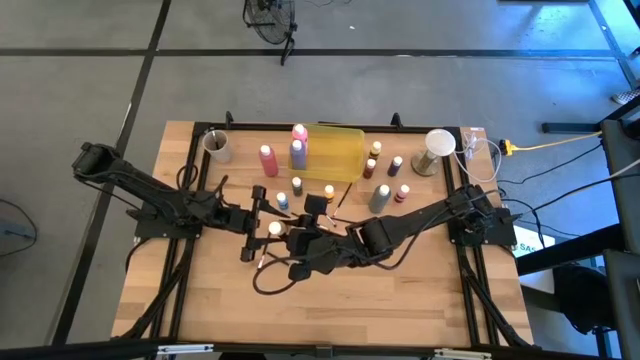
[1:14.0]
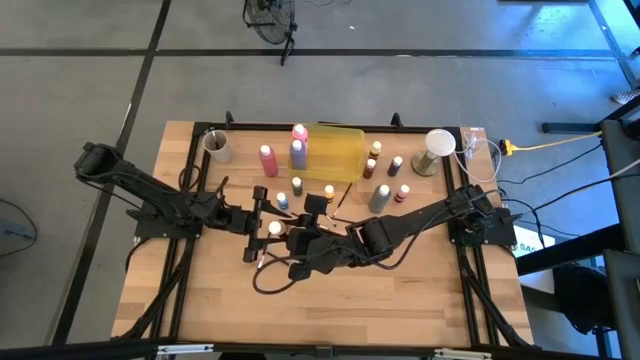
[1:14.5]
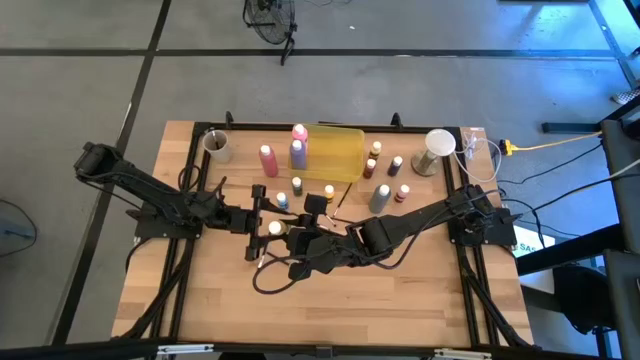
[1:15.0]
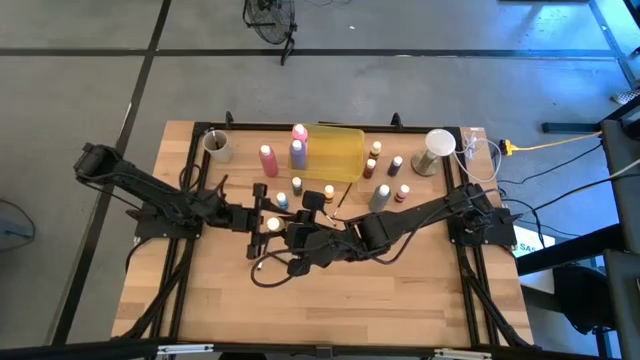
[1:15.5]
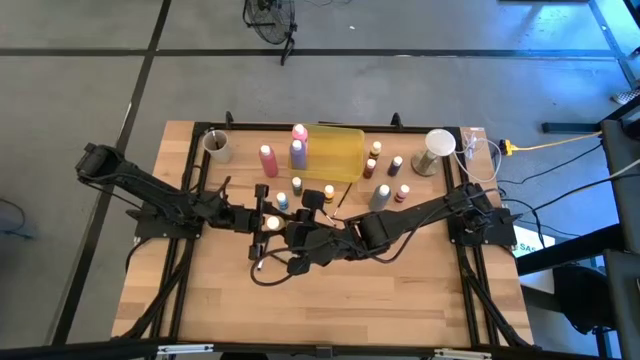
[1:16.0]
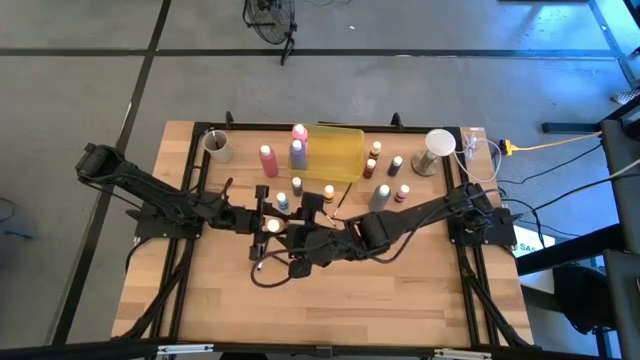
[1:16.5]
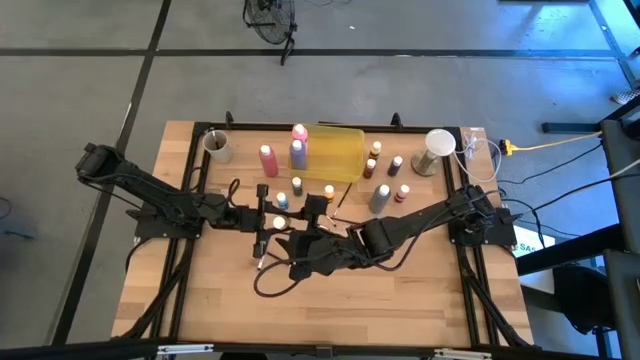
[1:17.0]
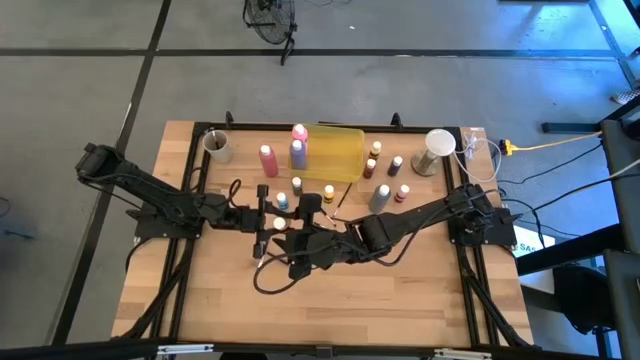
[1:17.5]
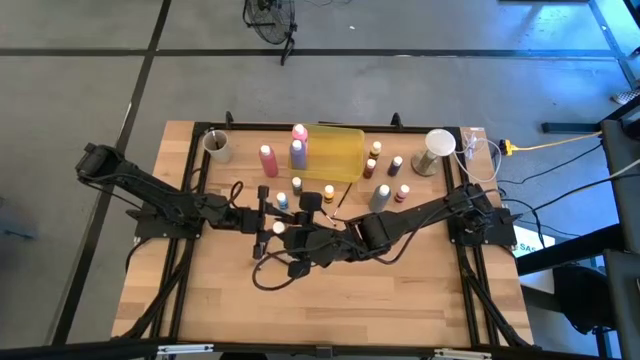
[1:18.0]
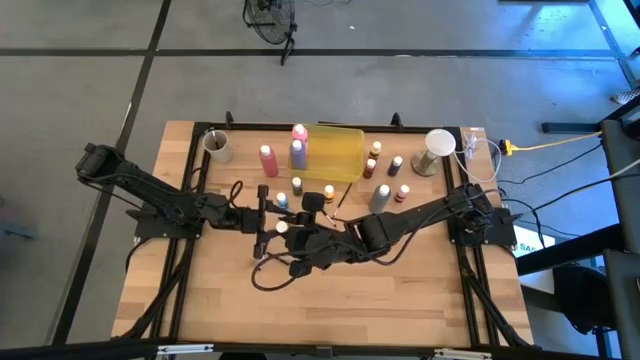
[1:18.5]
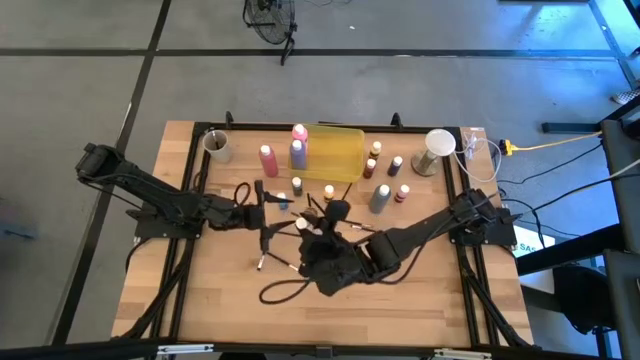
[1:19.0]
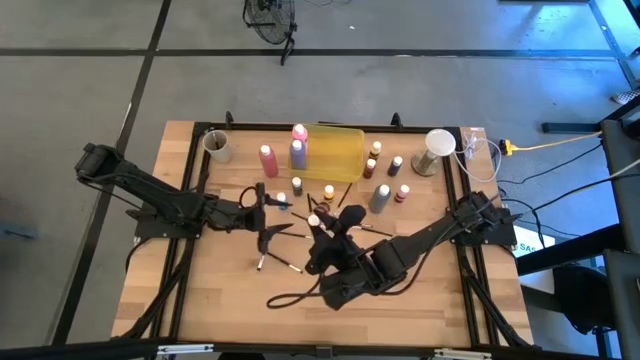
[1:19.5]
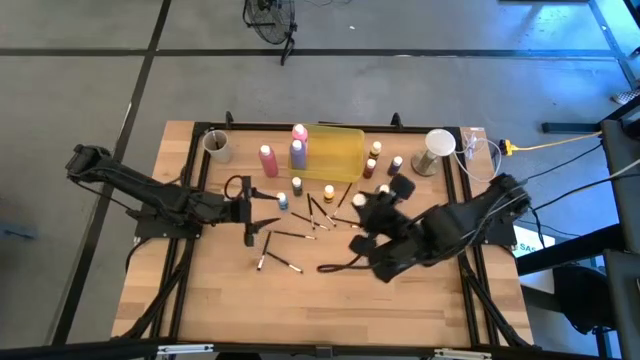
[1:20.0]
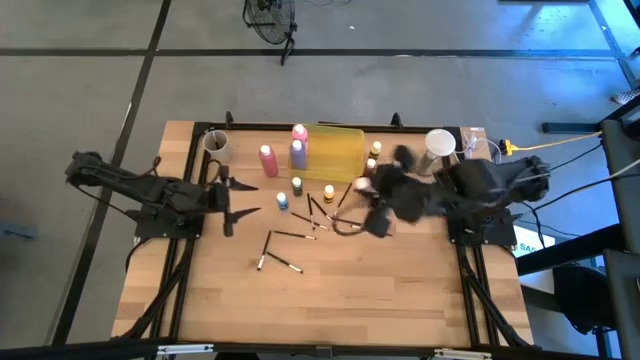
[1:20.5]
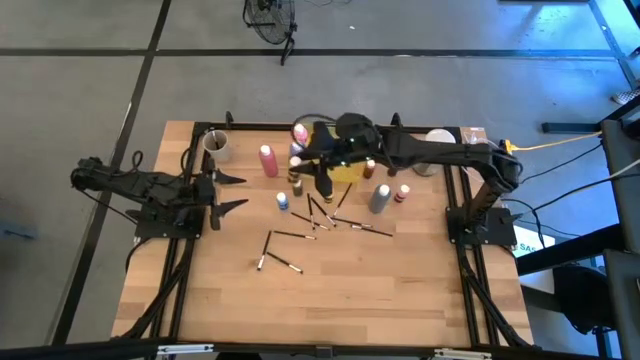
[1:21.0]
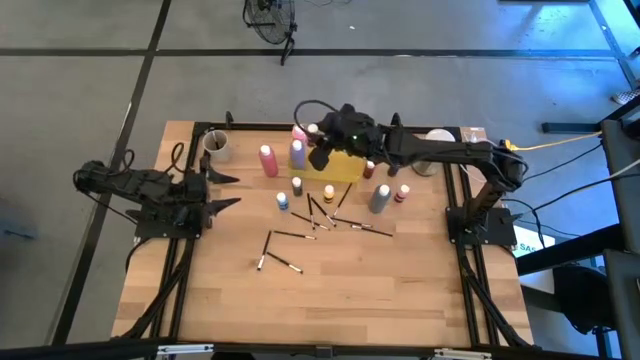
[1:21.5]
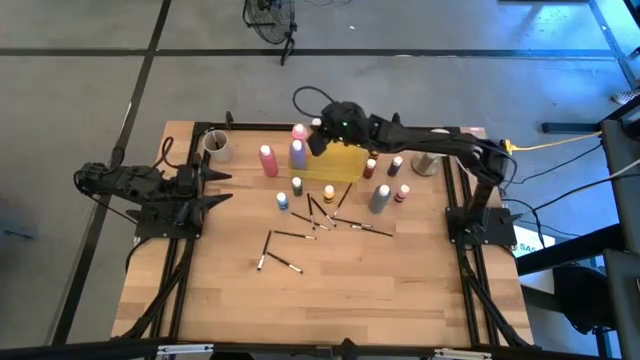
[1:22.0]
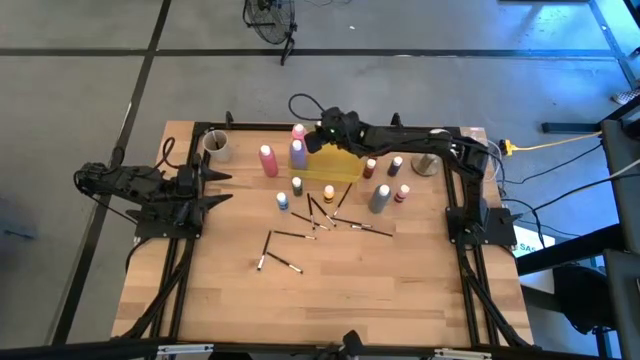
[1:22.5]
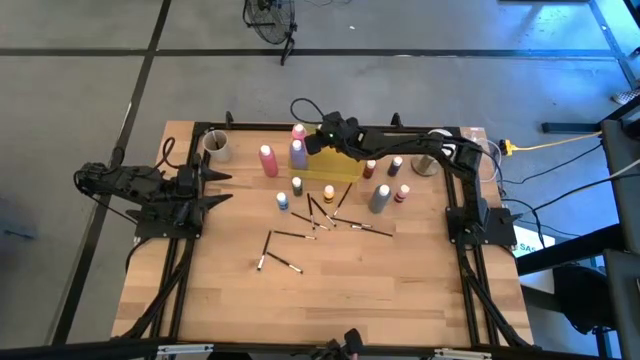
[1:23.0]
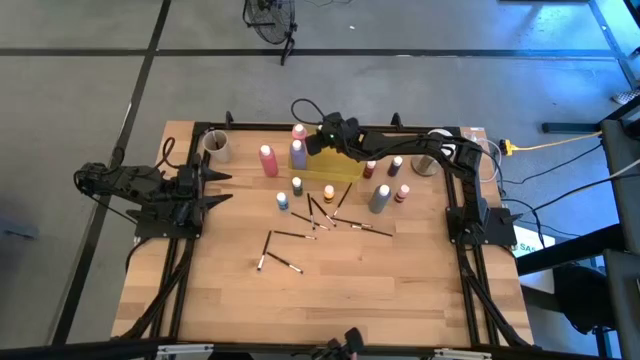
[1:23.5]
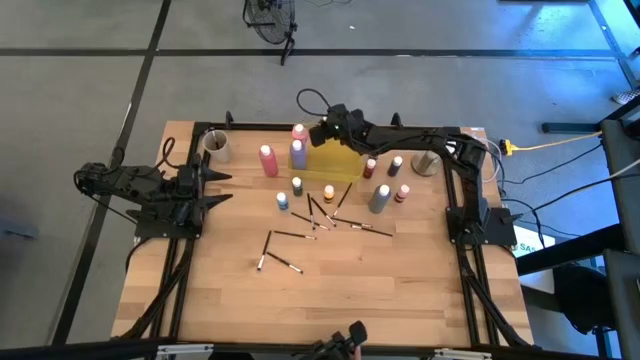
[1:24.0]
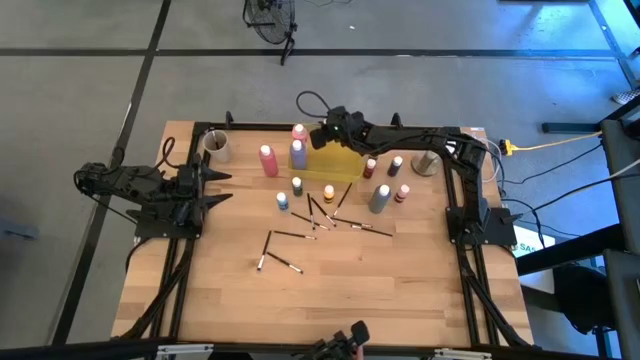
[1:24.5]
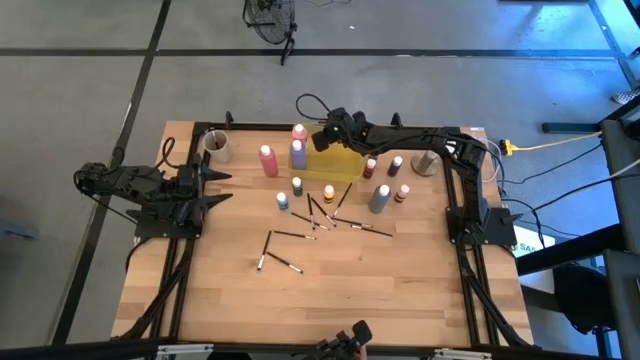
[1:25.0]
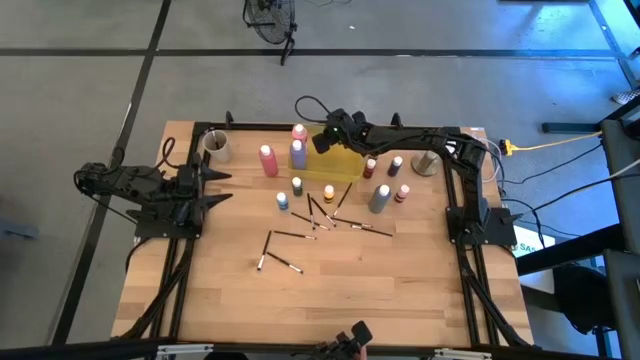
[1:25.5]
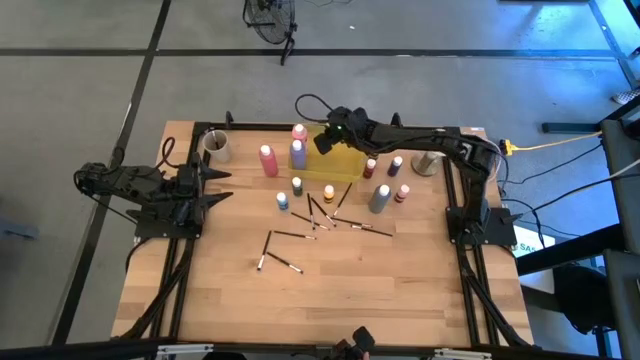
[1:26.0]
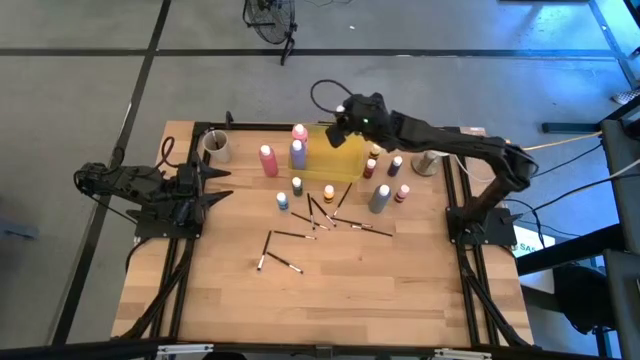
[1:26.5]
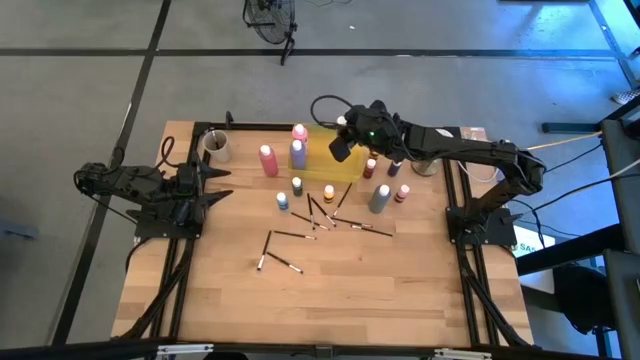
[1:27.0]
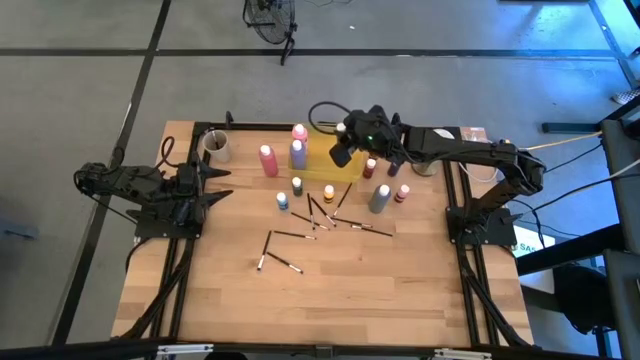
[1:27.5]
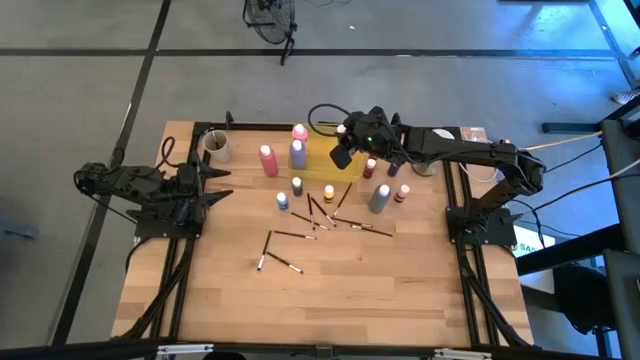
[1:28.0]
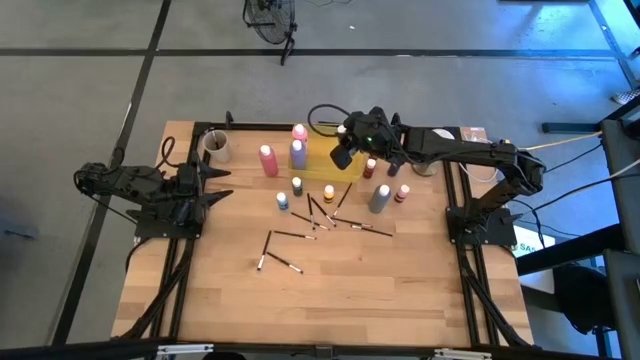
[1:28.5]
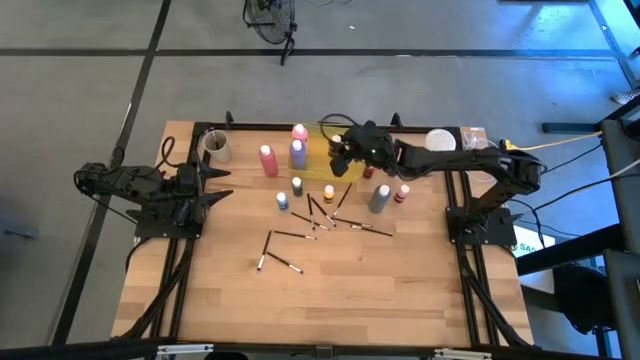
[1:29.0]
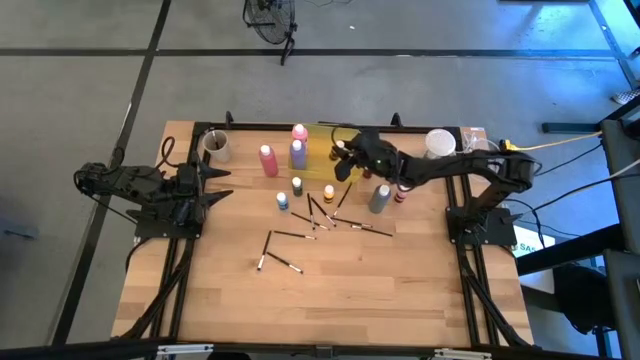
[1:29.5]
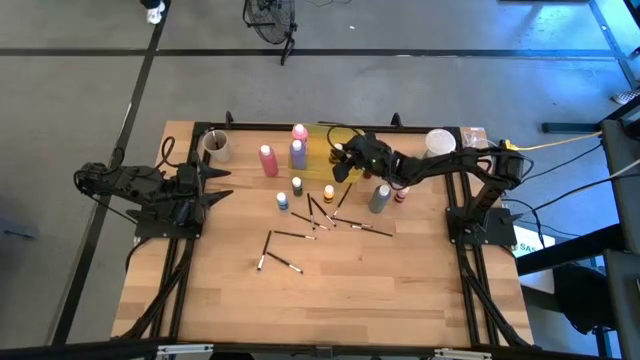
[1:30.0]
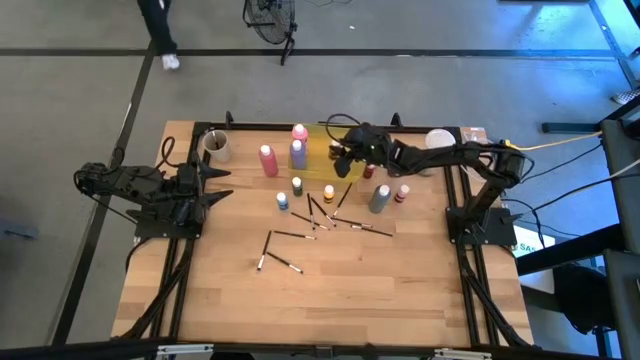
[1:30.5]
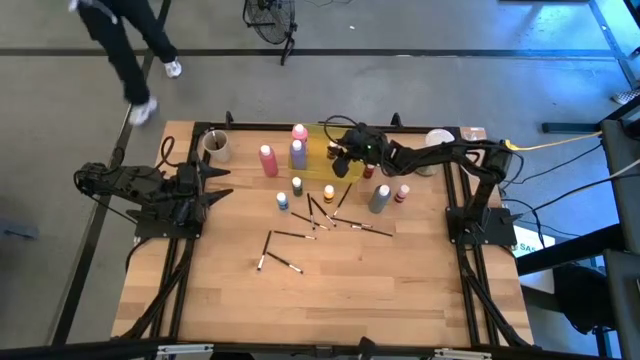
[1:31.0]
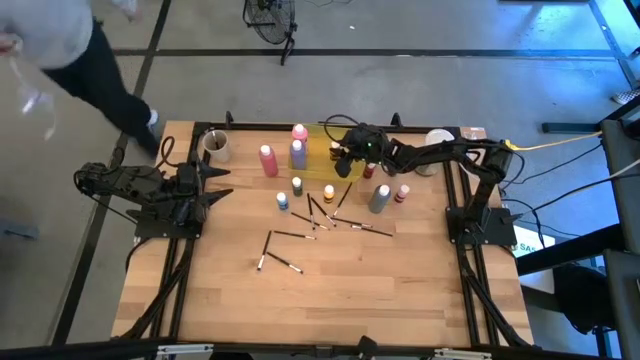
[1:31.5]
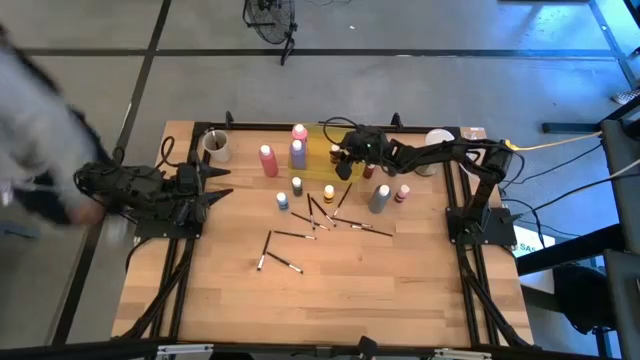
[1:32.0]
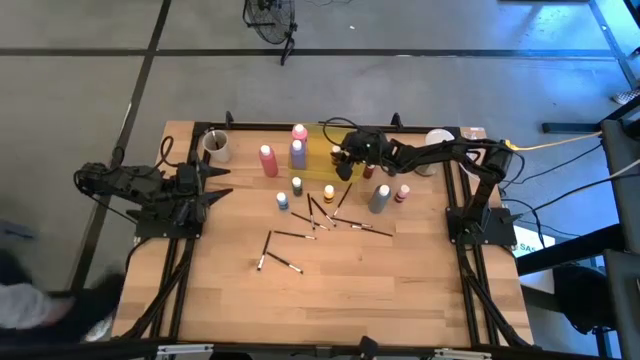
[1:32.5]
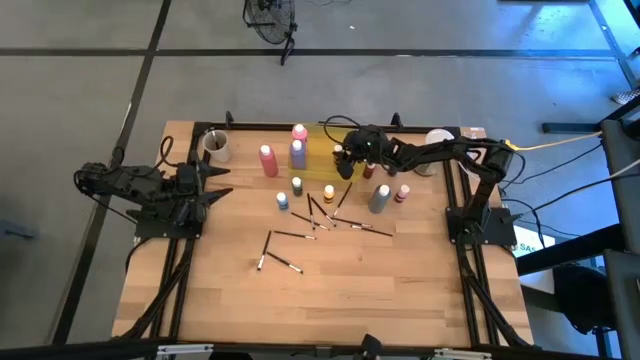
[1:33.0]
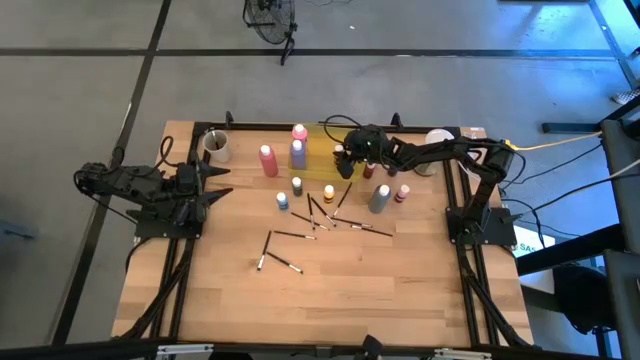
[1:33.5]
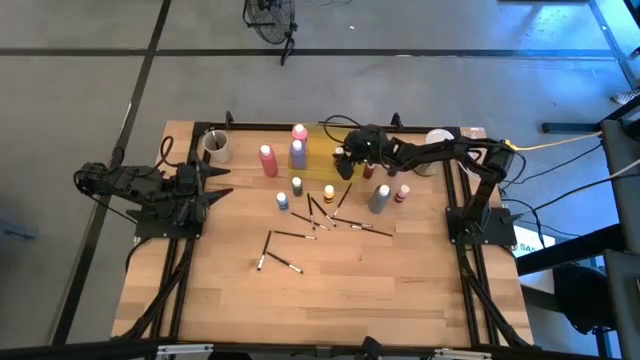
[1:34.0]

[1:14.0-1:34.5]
Task: Pick & Place Paint Supplies
Put the small dark yellow paint bottle into the yellow bin

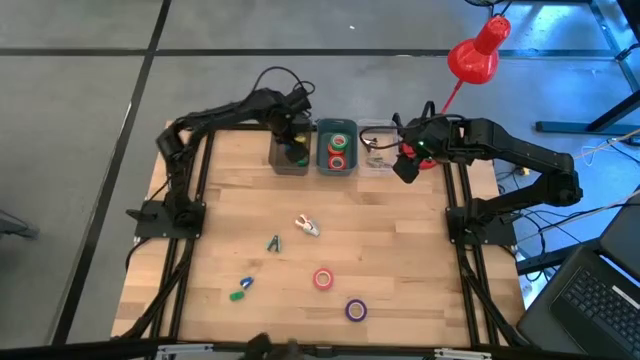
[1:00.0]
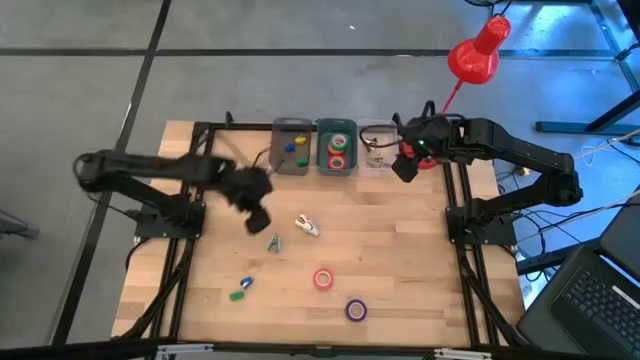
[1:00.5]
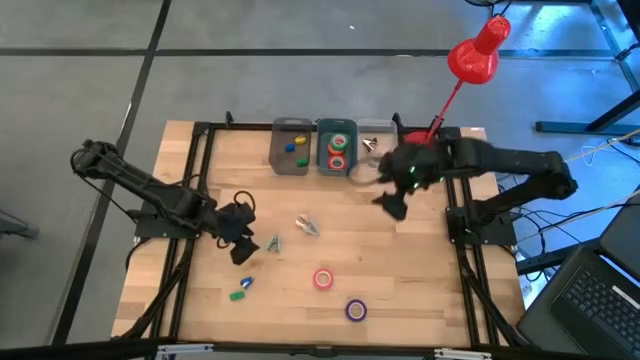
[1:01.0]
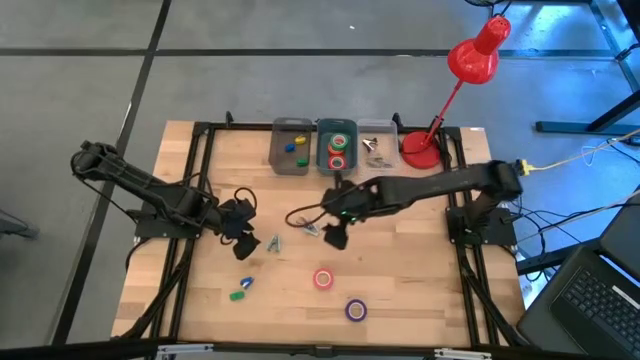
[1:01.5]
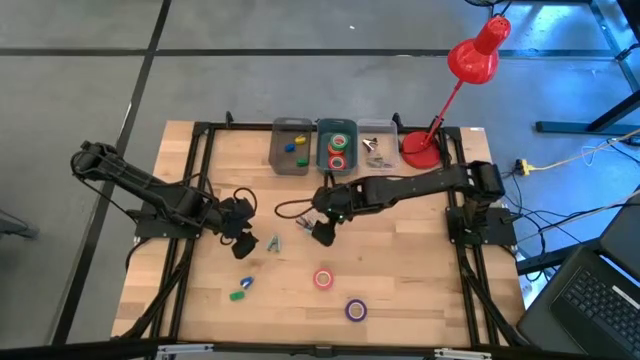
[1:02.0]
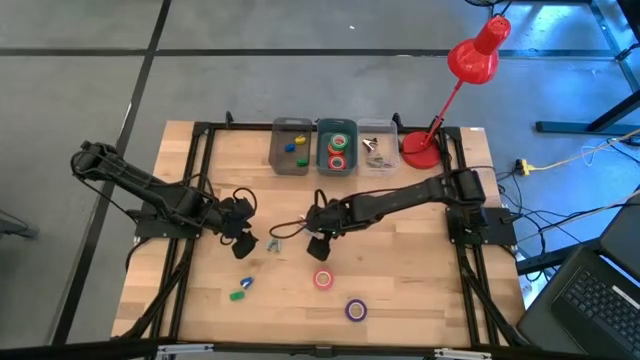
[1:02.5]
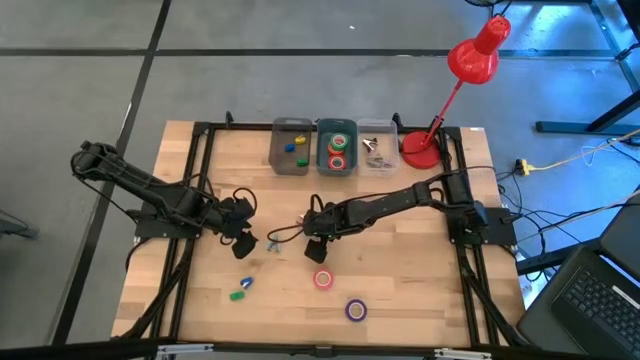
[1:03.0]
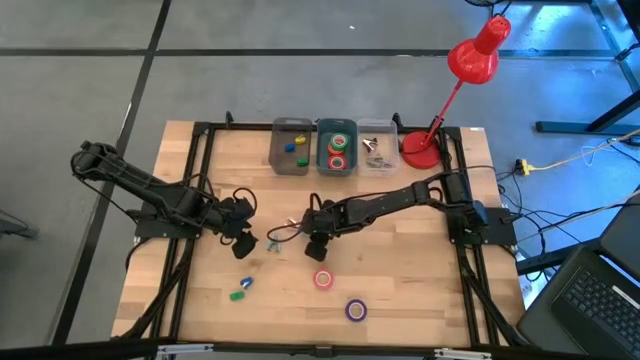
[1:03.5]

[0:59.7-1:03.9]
Task: Pick and place Stapler, Stapler remover, tape
Put the blue staple remover into the transparent bin
